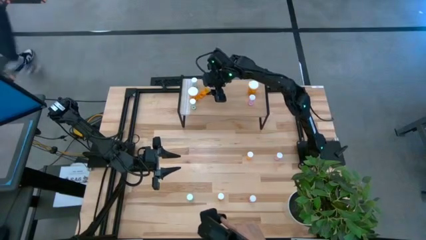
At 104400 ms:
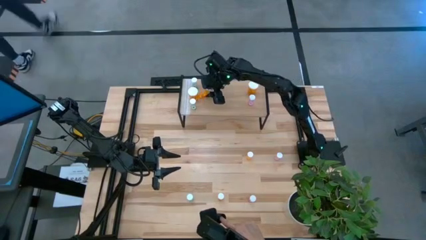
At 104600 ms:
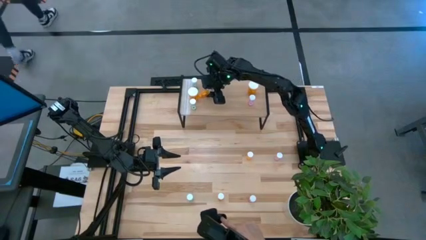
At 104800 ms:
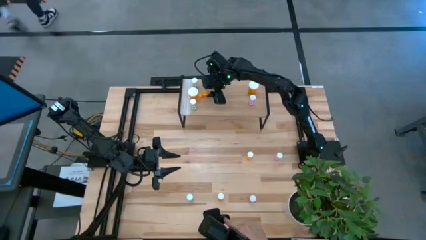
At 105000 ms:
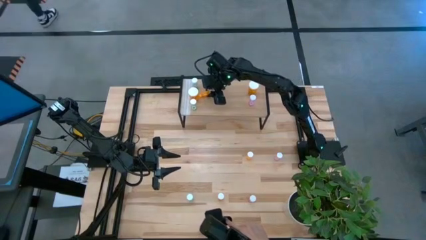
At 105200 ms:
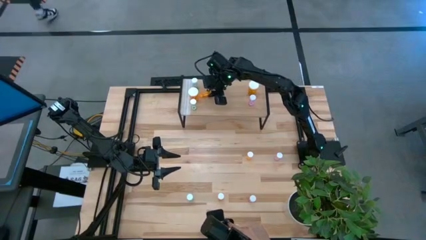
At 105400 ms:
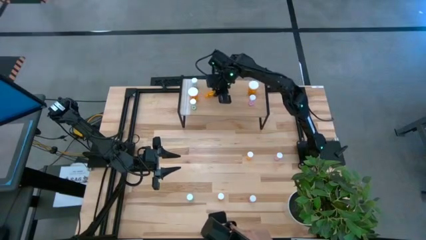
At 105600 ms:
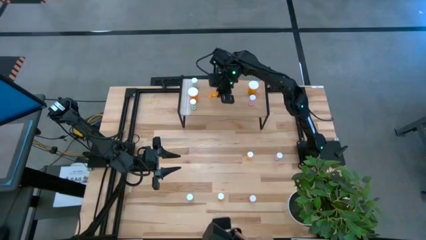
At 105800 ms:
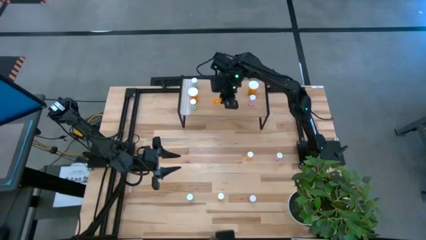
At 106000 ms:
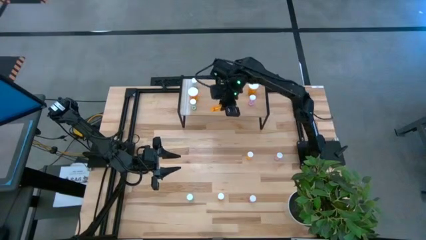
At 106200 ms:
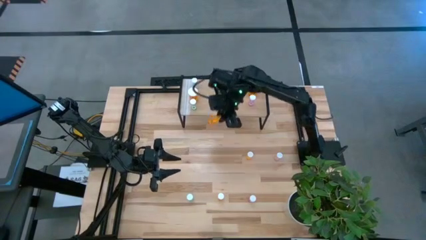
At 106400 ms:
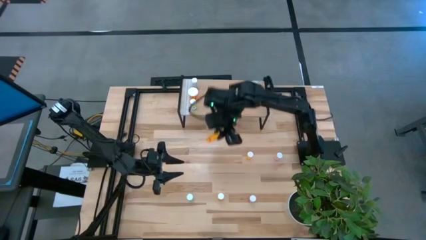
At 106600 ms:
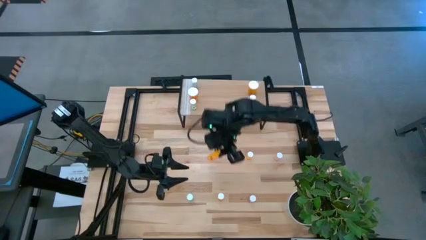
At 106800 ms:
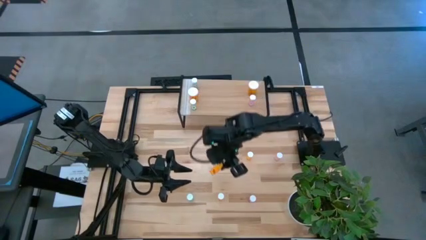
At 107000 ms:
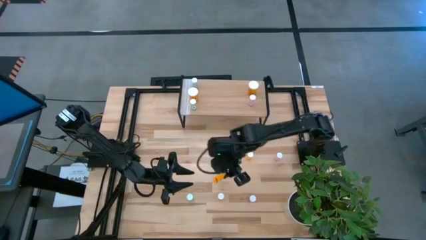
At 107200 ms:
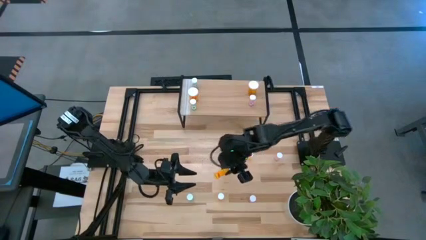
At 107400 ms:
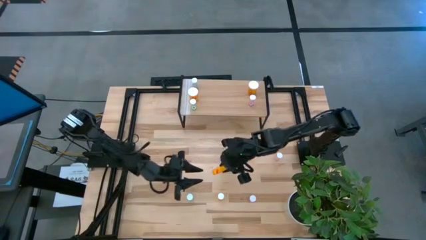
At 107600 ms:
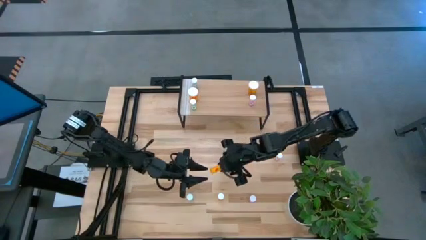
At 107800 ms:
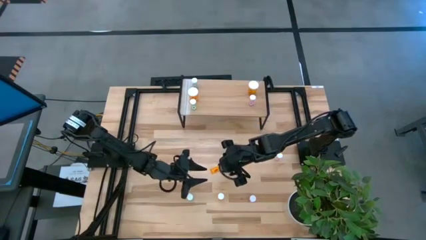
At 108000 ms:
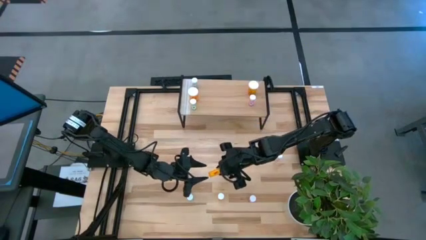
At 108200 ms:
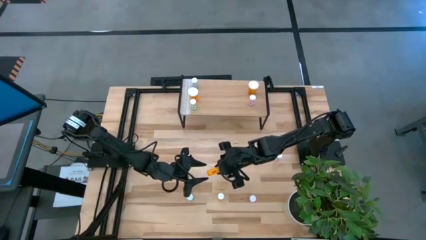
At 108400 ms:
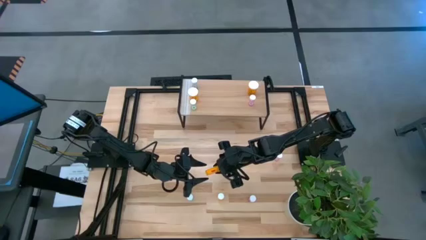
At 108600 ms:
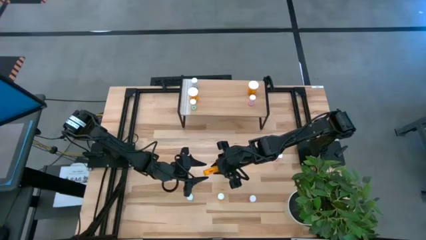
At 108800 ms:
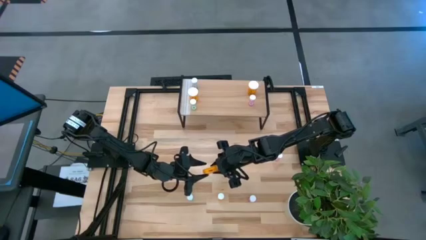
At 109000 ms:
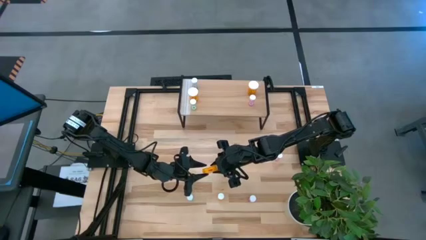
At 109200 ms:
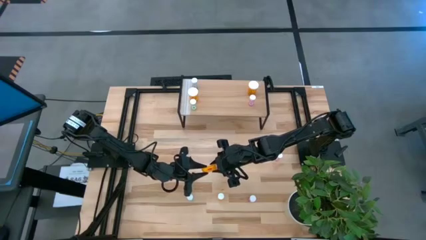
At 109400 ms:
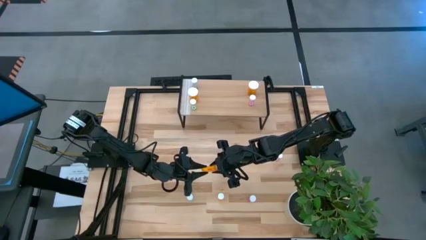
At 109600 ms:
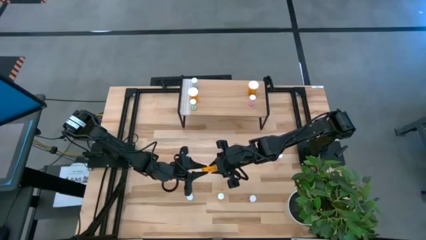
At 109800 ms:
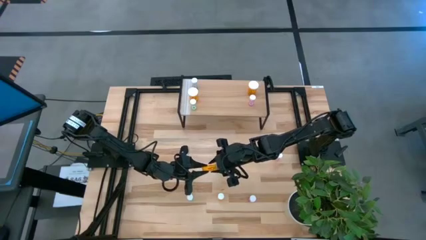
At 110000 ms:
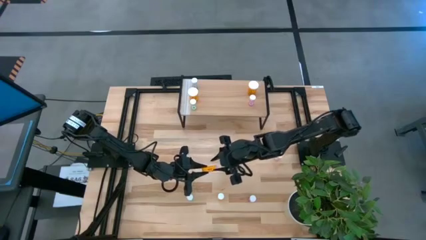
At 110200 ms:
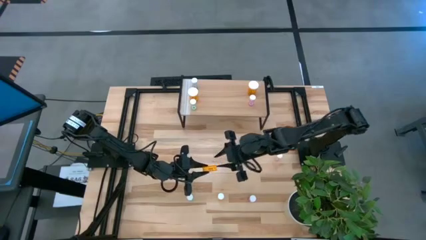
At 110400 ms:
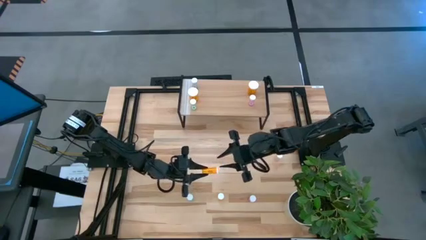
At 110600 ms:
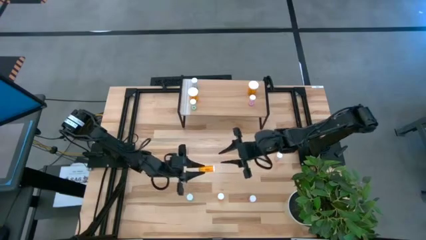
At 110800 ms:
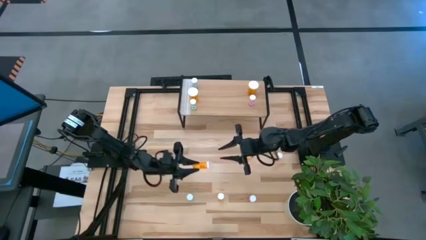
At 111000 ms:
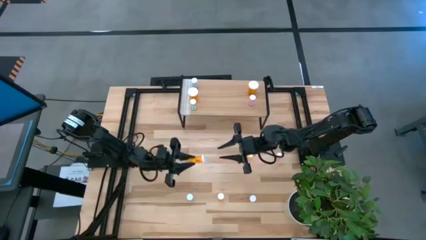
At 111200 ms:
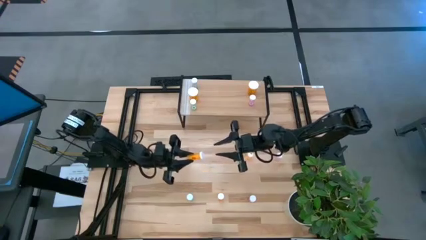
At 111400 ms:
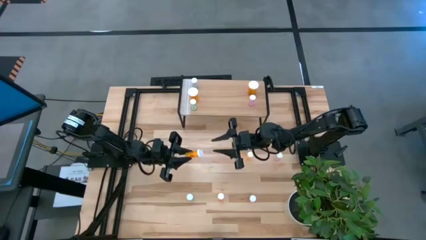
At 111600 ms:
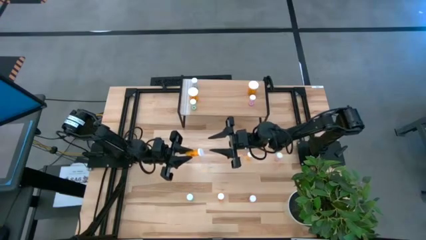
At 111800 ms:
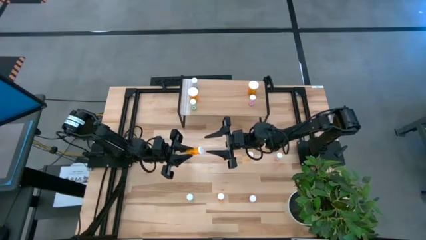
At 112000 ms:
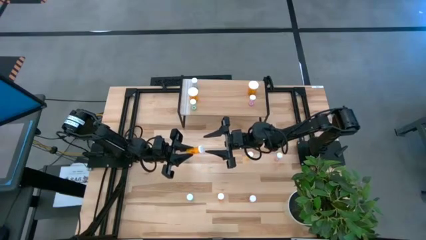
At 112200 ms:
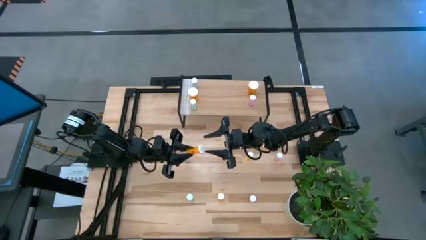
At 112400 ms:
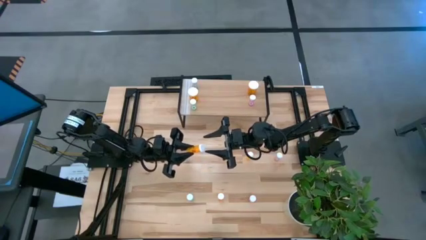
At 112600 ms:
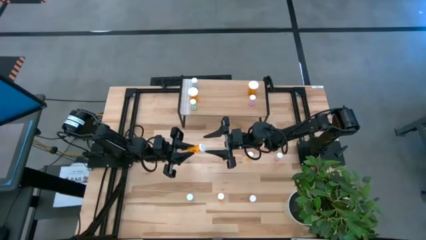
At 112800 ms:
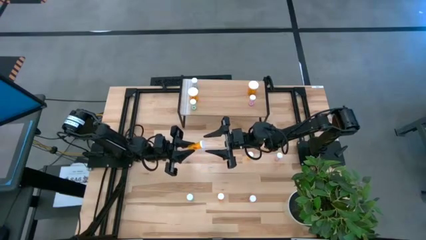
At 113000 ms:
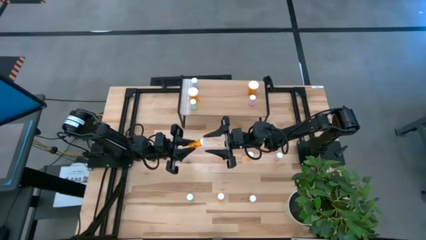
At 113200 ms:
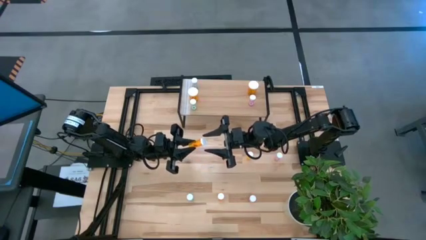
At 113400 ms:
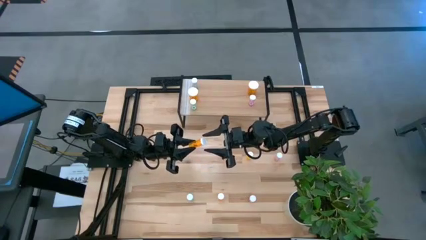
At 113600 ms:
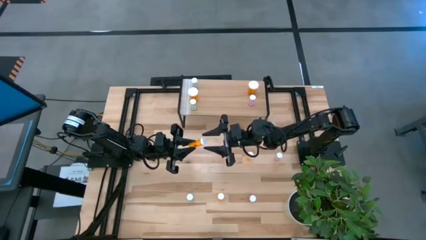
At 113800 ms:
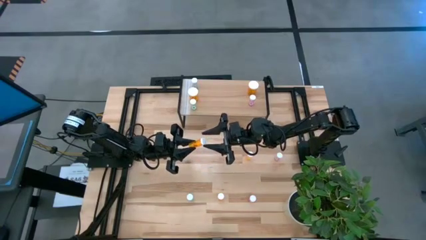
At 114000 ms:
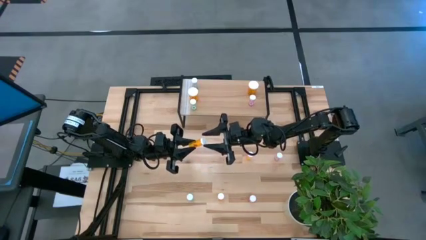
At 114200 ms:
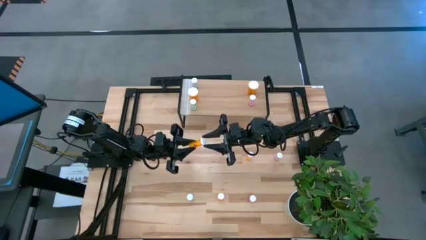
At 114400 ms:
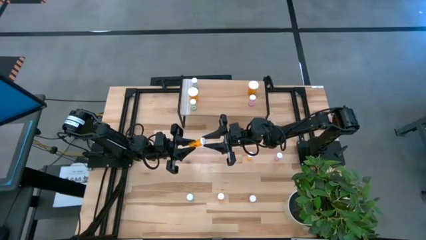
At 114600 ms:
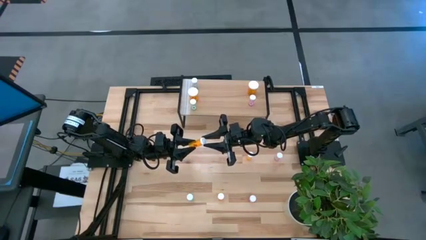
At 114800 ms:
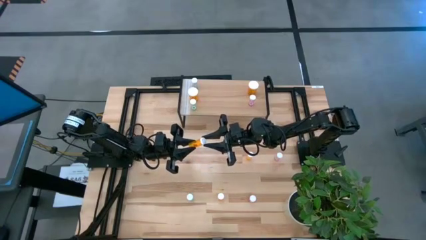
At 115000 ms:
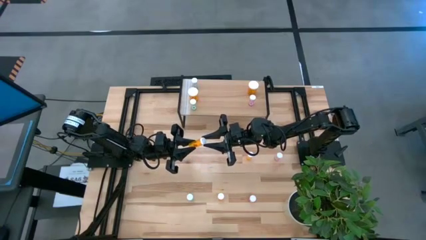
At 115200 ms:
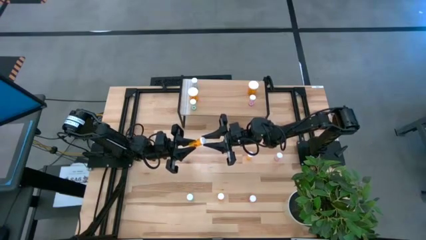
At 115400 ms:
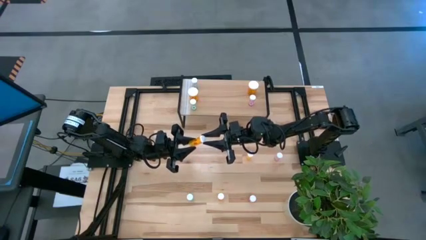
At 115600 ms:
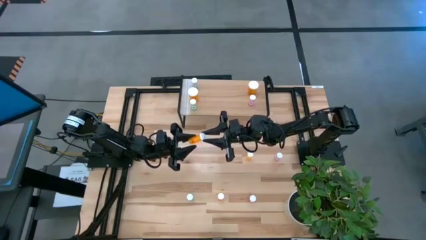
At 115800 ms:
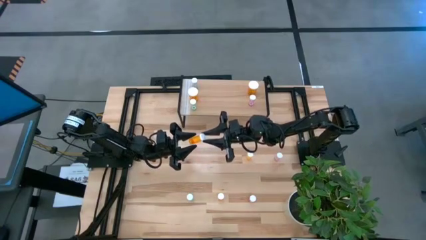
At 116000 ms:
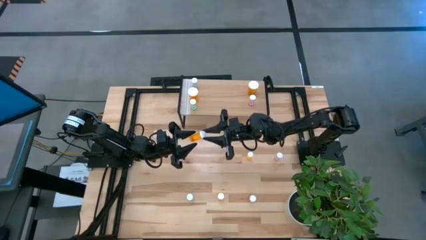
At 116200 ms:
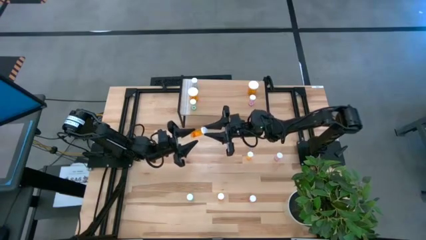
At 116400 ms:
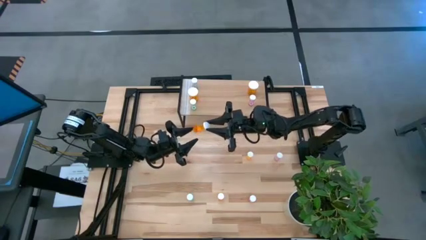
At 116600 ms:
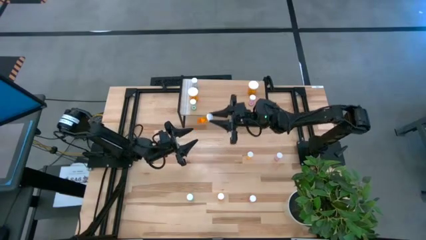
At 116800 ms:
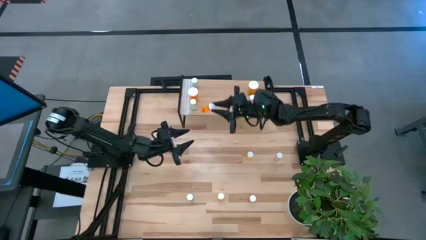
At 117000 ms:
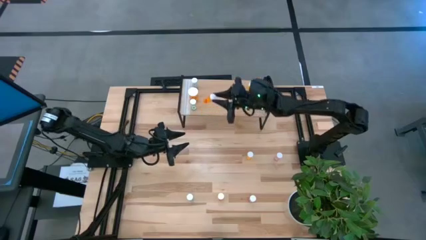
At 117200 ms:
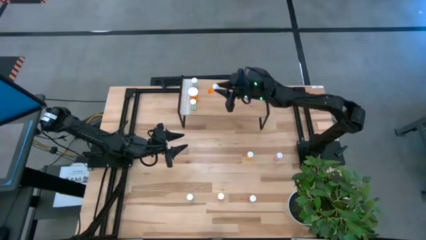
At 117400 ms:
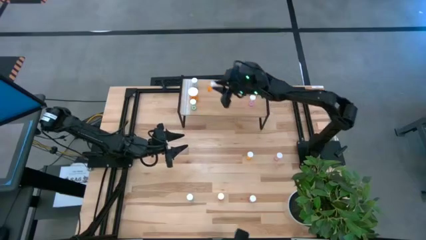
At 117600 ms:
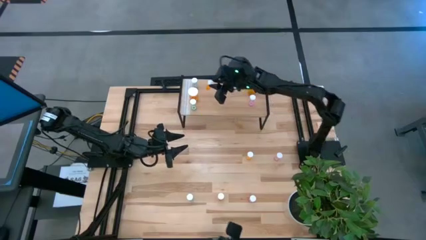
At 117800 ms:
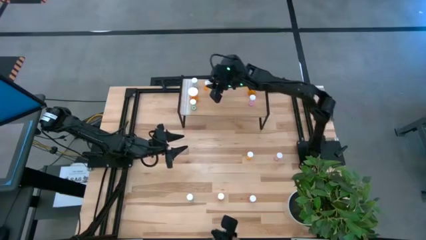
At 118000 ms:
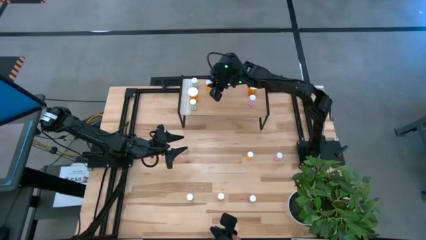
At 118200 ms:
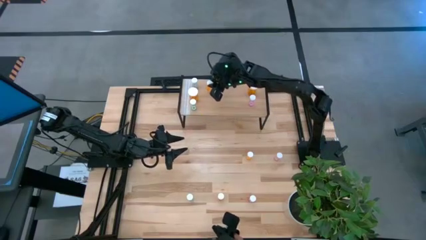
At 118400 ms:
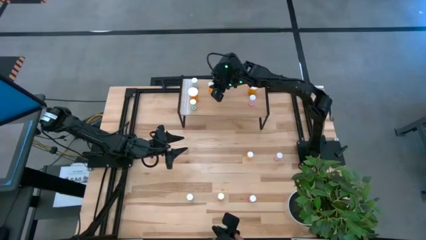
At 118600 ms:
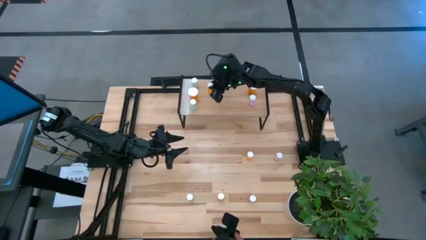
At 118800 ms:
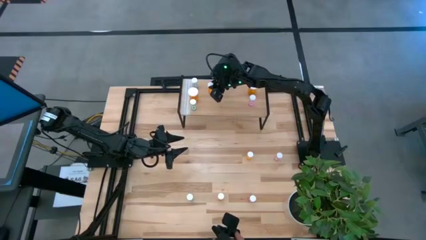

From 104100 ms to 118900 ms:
Task: Pick and place medicine bottles onto shelf by color
Put the bottom left small orange pill bottle on the shelf
